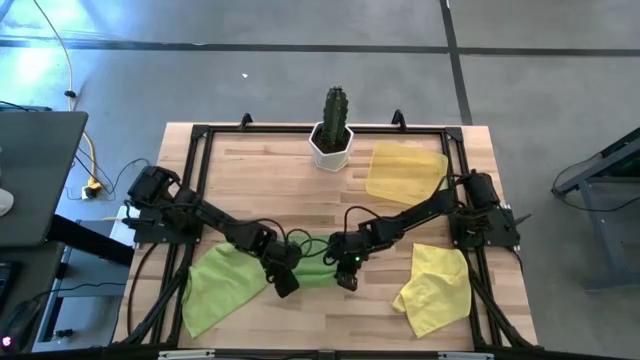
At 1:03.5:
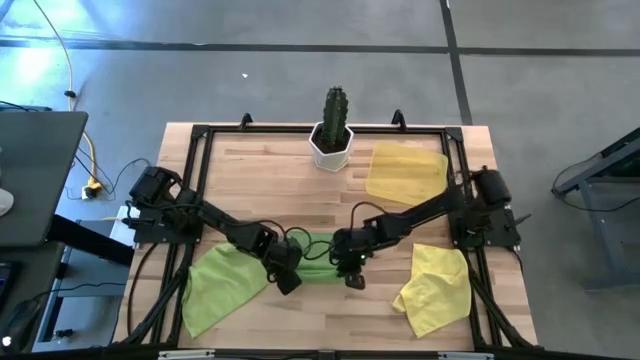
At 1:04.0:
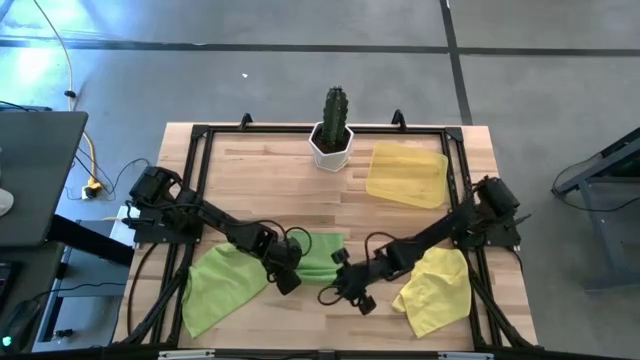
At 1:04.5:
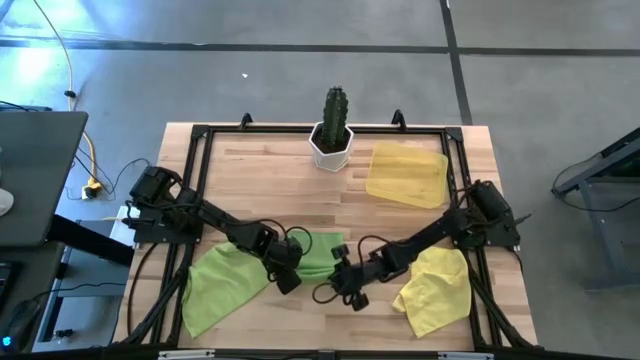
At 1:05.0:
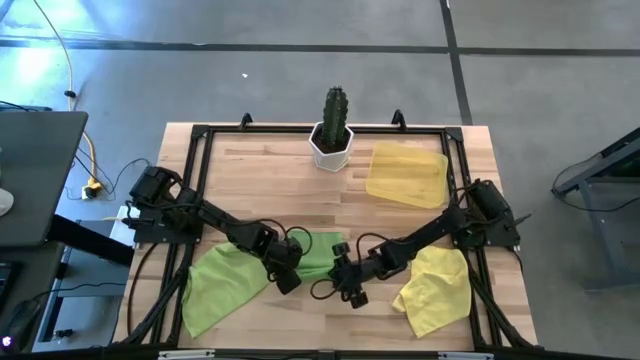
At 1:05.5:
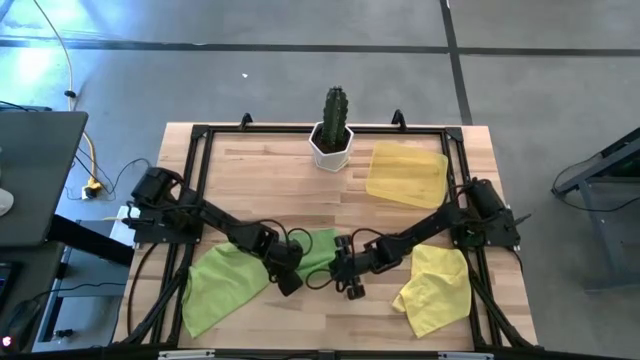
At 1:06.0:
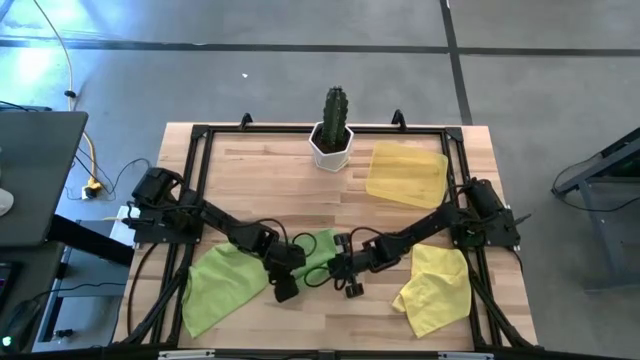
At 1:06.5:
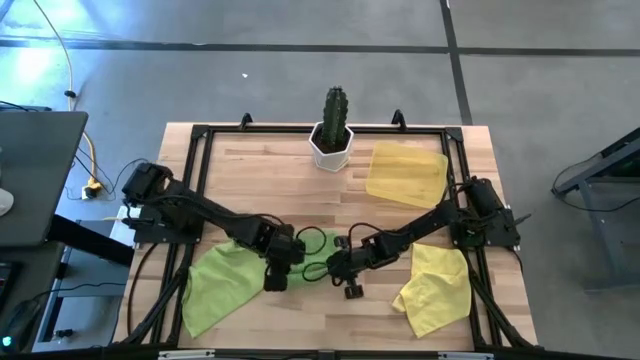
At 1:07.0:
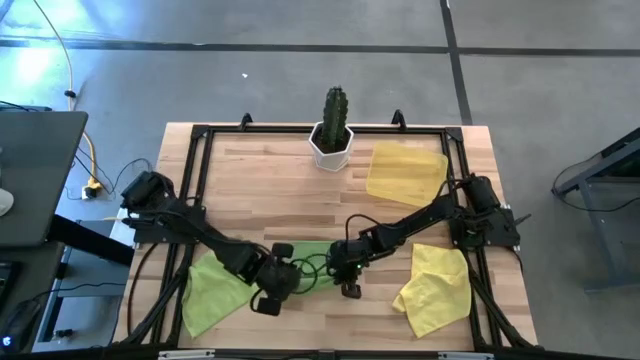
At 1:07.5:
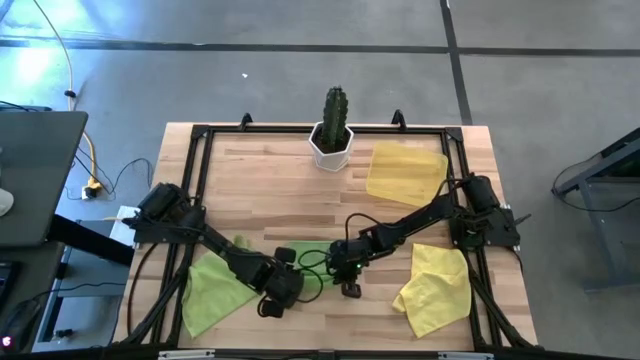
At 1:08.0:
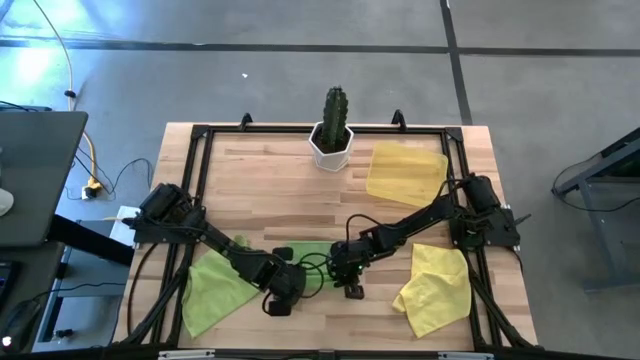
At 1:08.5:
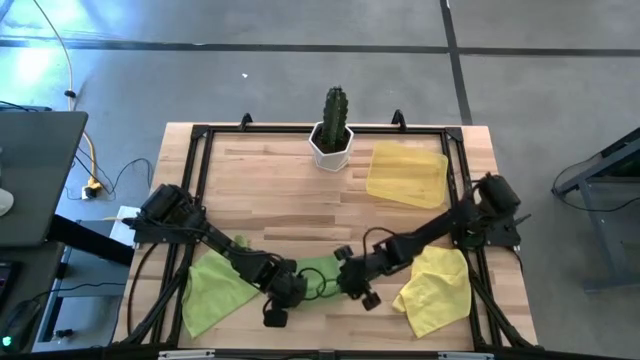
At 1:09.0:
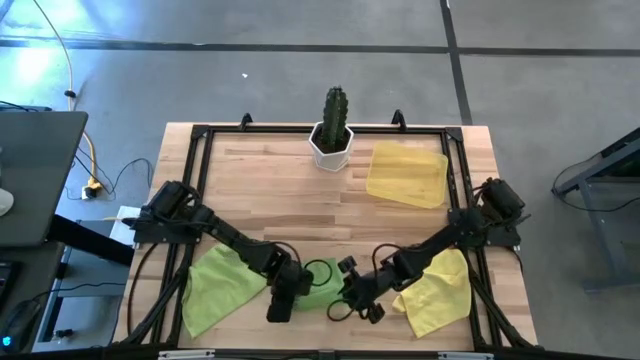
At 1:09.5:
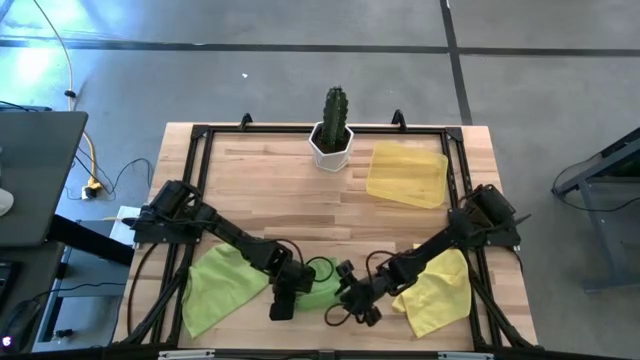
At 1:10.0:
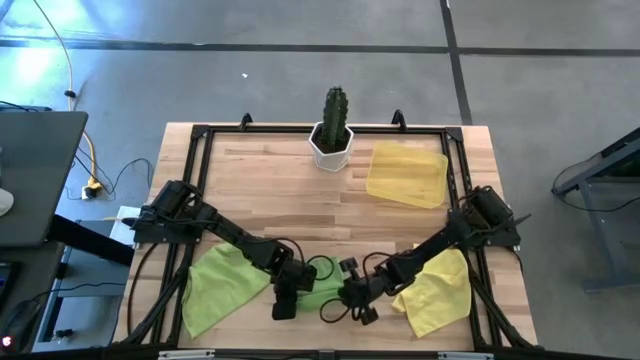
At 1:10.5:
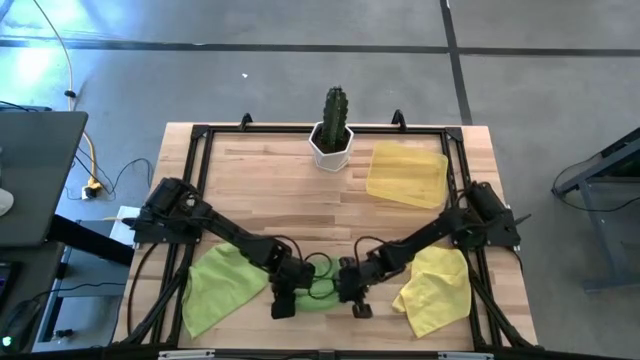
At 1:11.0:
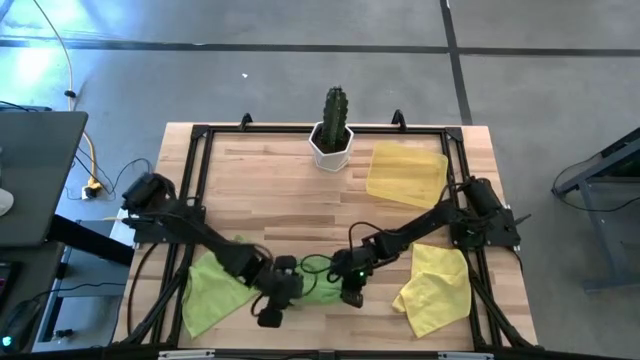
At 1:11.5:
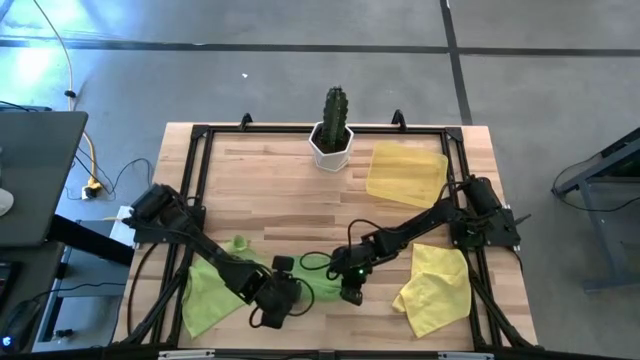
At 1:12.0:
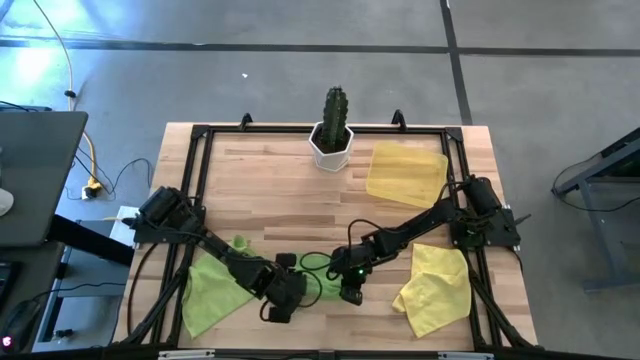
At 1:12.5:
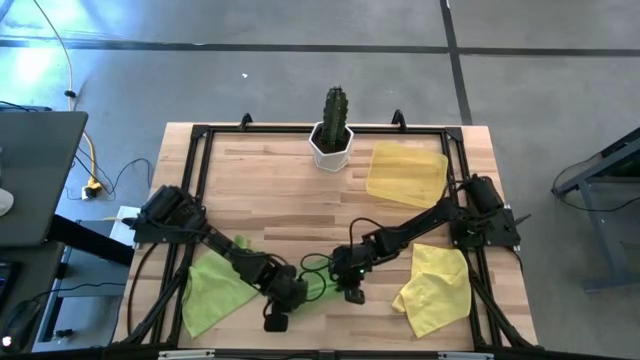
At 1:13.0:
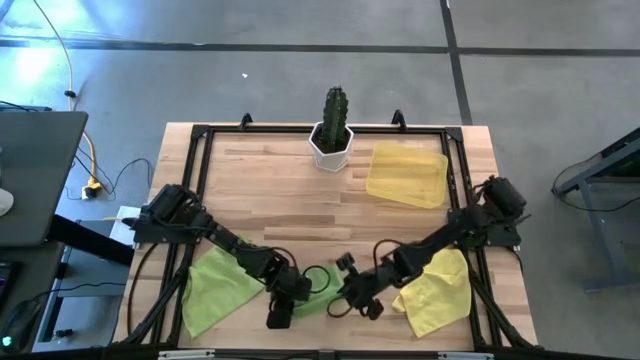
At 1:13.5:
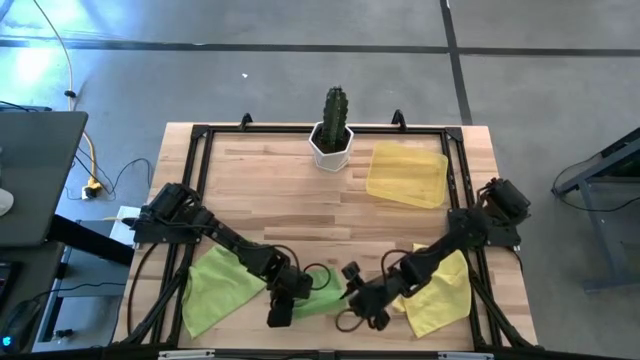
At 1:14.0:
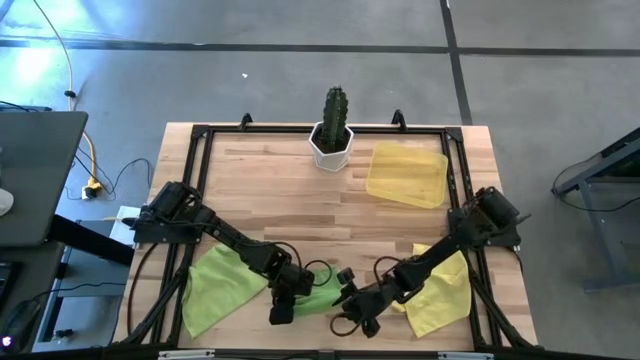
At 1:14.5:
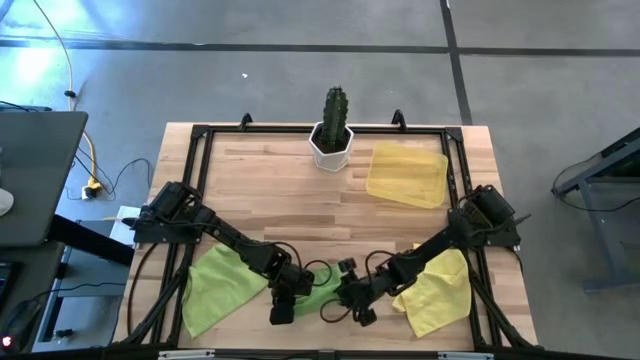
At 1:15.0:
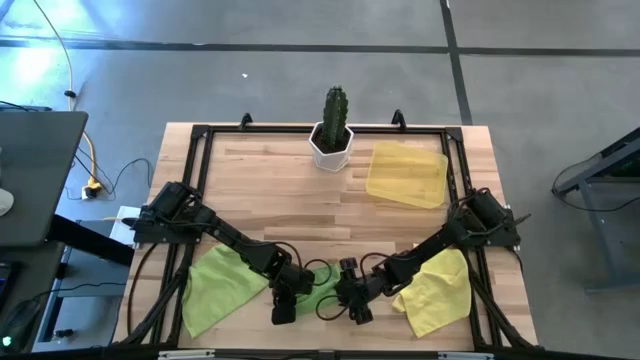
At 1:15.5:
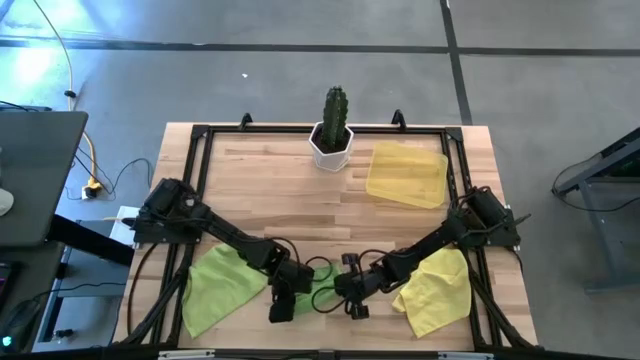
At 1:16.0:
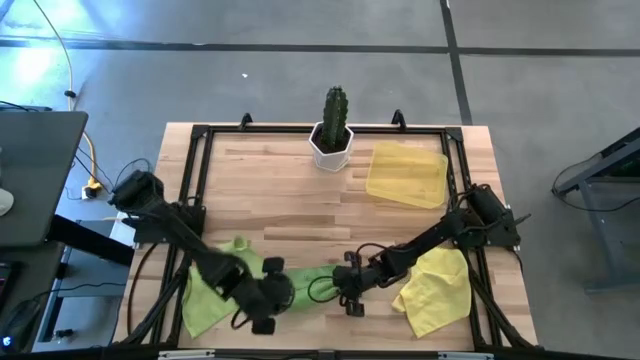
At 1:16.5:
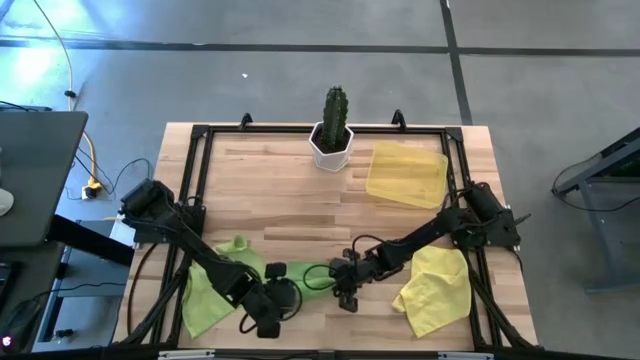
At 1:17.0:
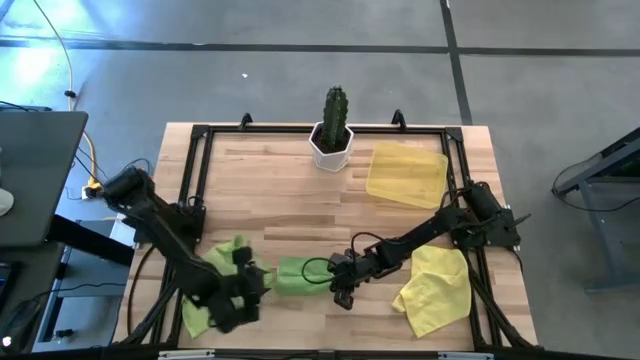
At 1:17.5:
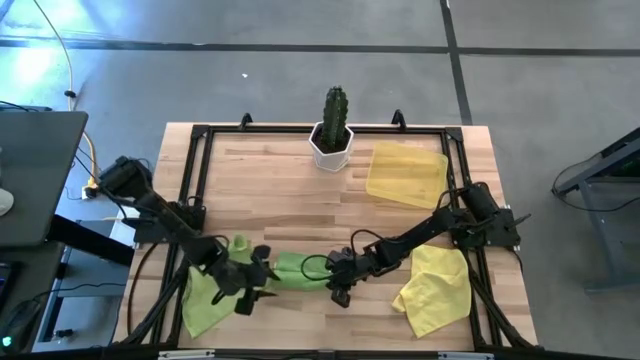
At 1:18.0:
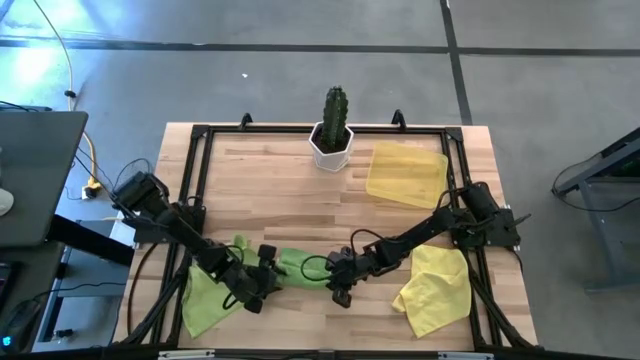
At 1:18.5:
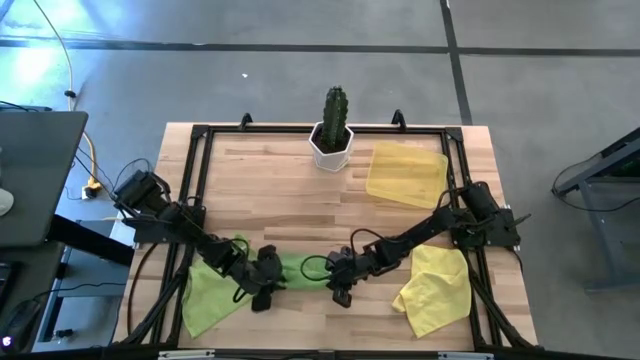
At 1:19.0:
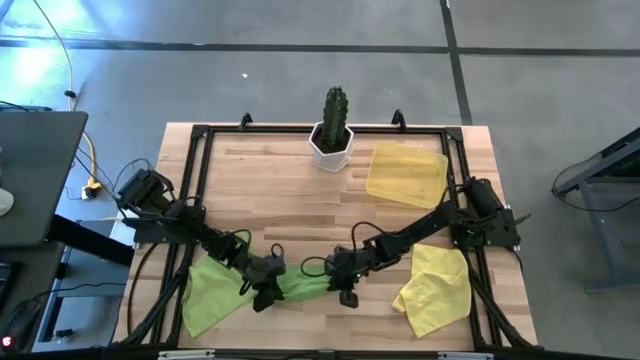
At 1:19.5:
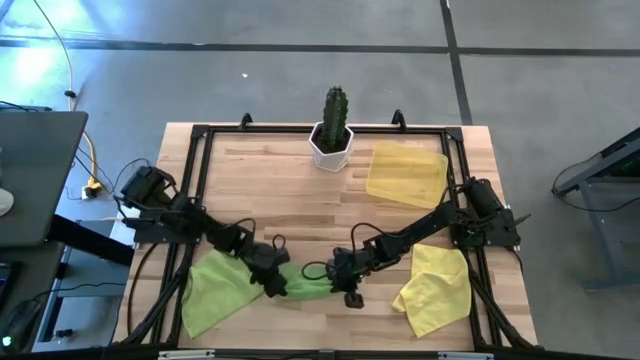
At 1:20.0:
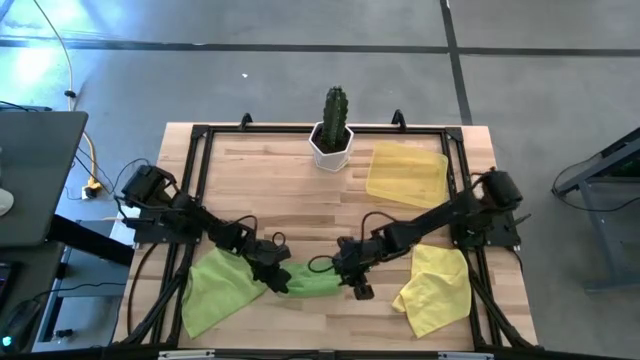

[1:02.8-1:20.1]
Task: Roll microfiber towels into tight, uniform cylinder then place into a basket
Roll the green towel

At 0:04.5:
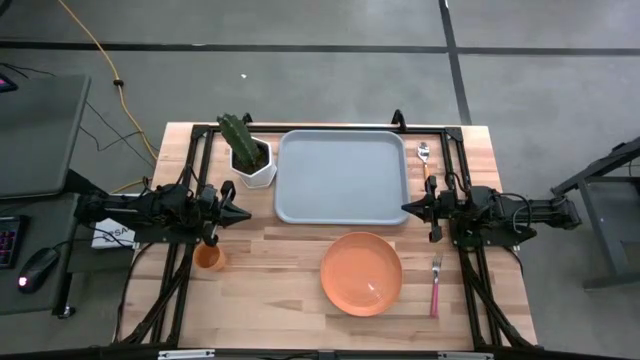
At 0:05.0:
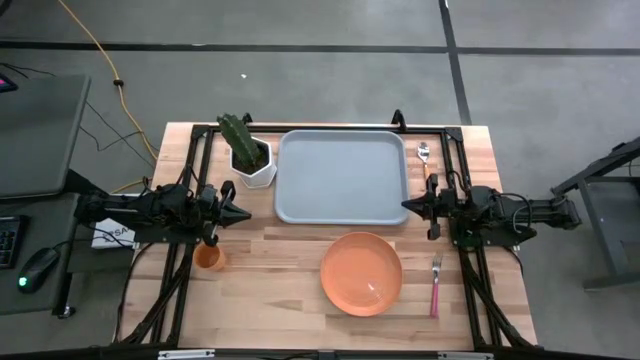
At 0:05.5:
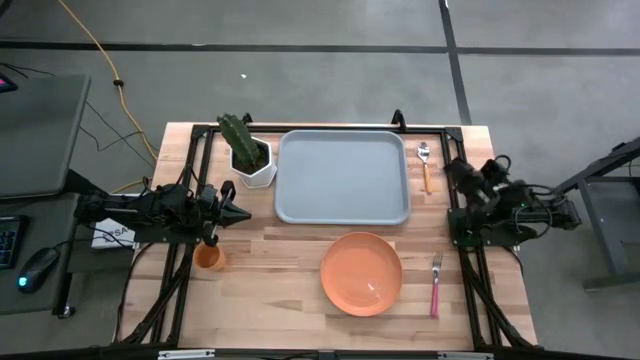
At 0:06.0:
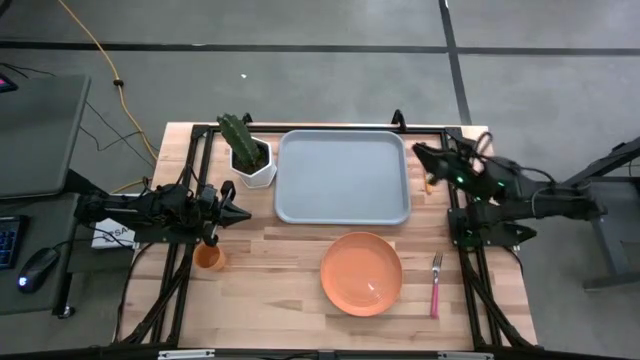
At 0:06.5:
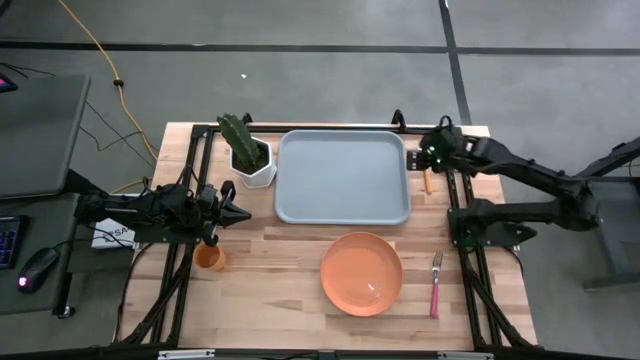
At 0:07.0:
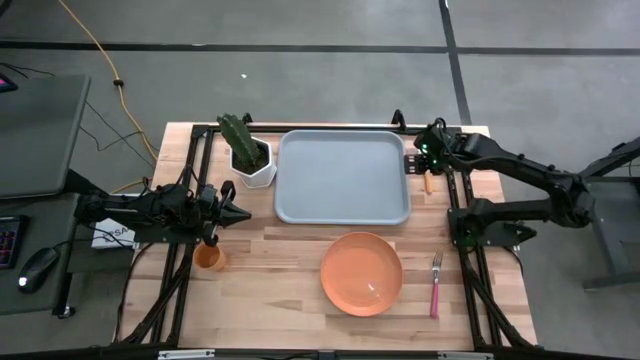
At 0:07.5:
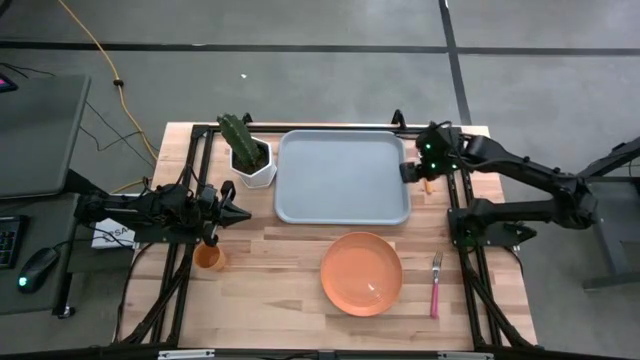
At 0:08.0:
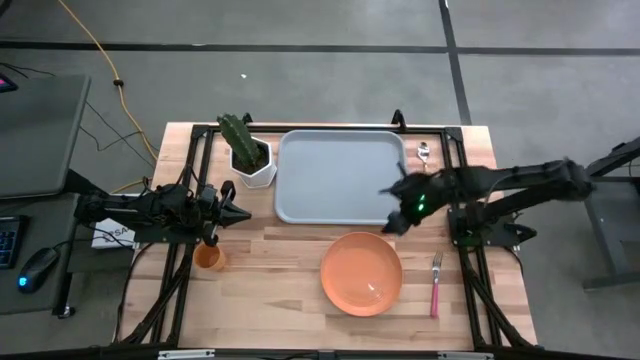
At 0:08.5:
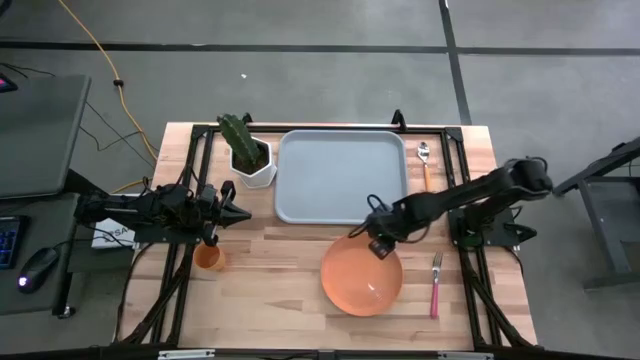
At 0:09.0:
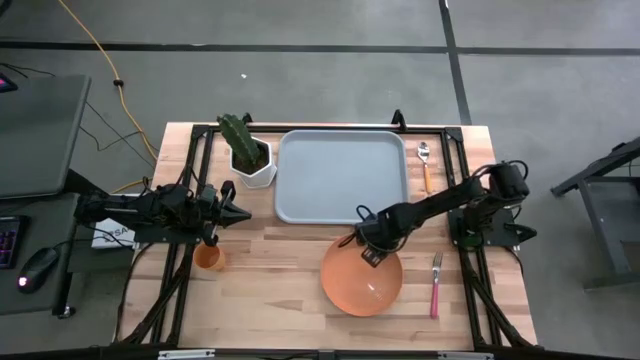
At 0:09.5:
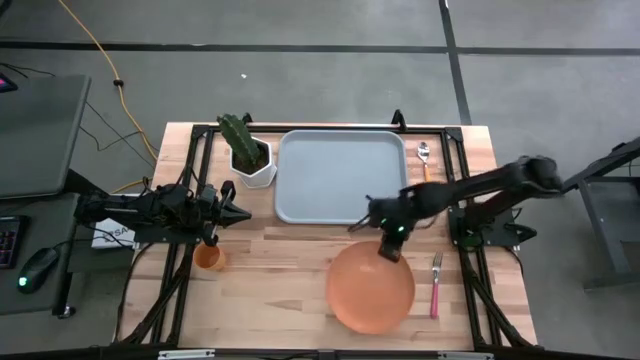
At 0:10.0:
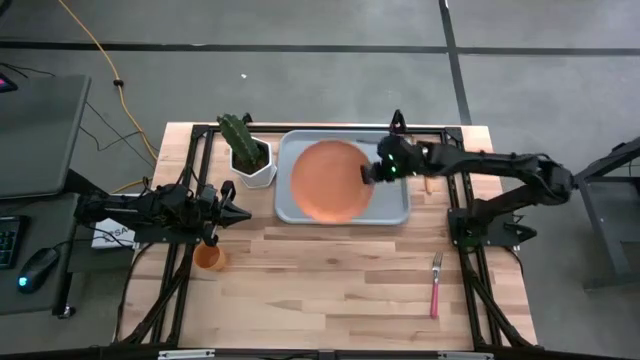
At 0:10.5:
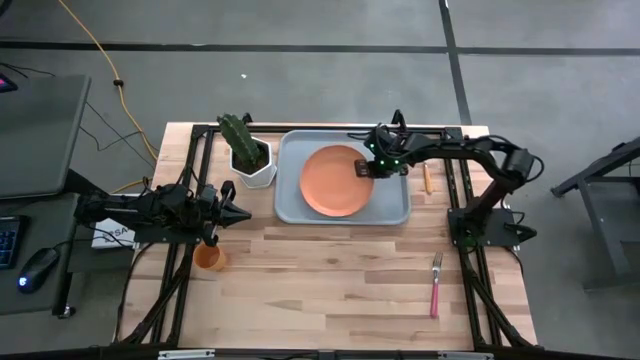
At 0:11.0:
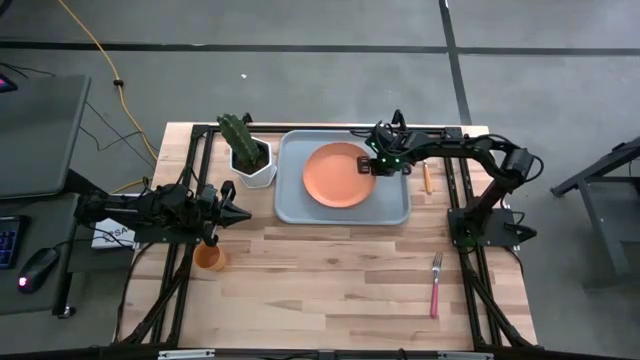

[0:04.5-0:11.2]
Task: Pick and place plate/cup/fork/spoon on tray
Put the orange plate on the center of the gray serving tray
